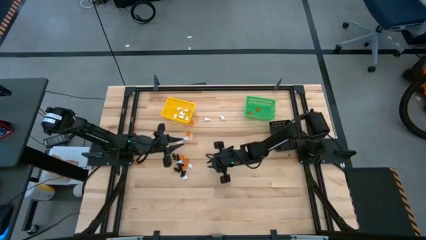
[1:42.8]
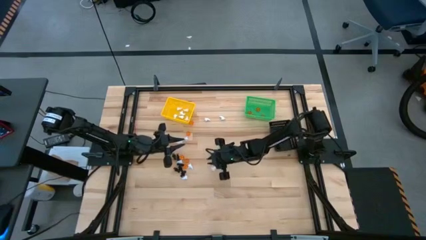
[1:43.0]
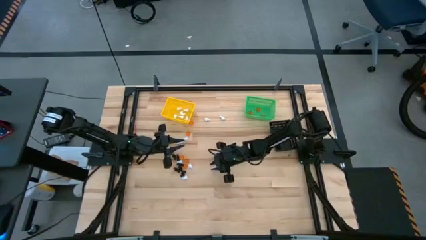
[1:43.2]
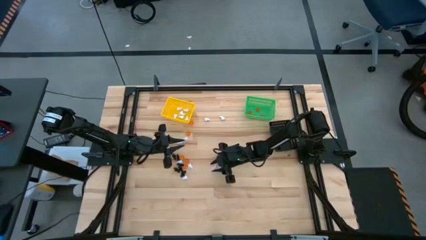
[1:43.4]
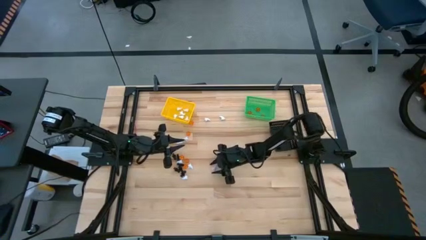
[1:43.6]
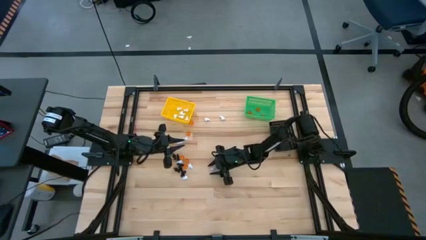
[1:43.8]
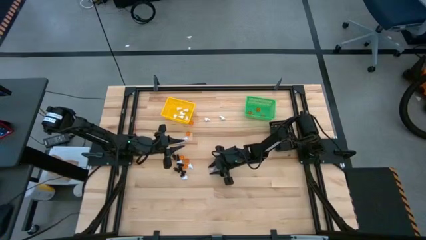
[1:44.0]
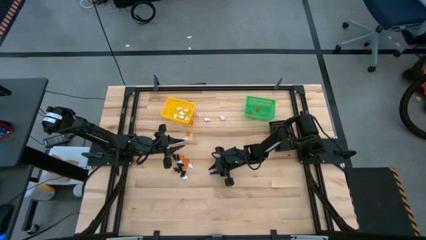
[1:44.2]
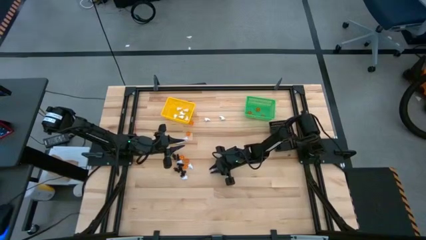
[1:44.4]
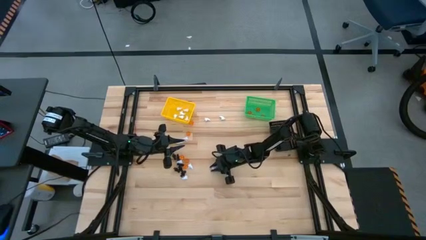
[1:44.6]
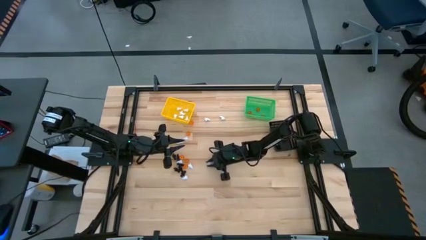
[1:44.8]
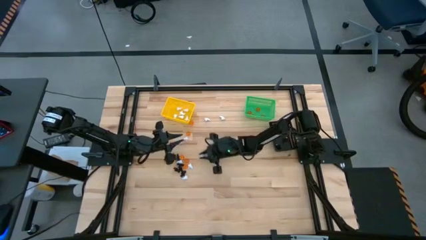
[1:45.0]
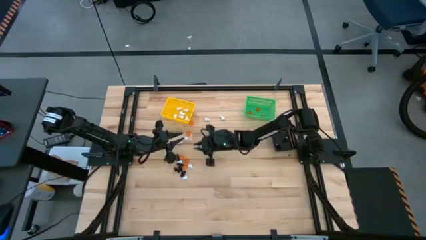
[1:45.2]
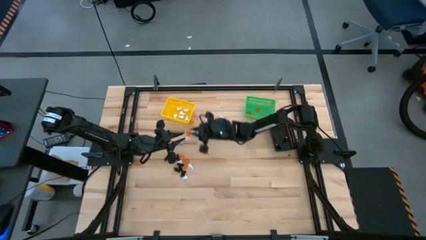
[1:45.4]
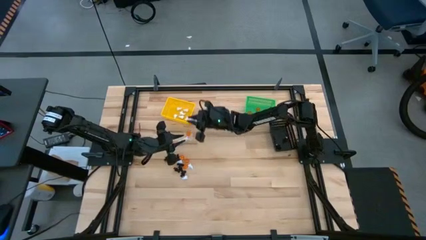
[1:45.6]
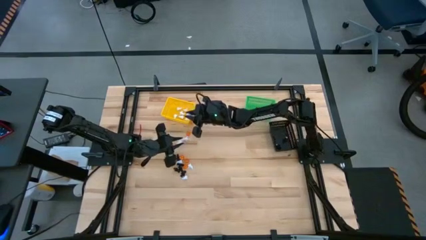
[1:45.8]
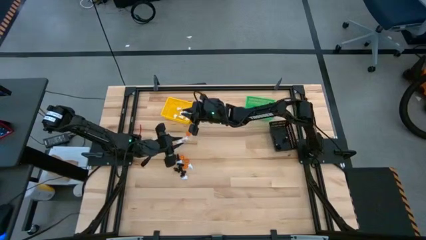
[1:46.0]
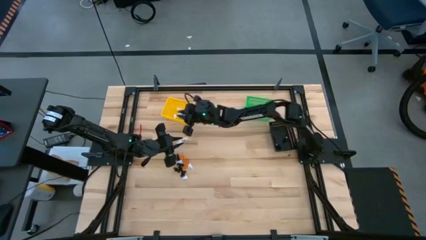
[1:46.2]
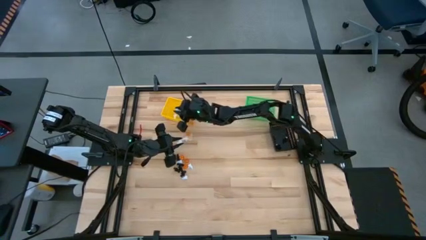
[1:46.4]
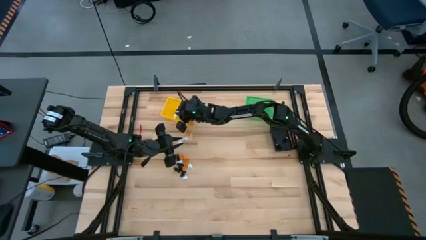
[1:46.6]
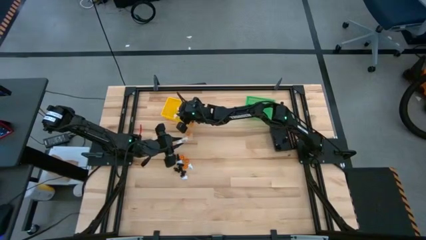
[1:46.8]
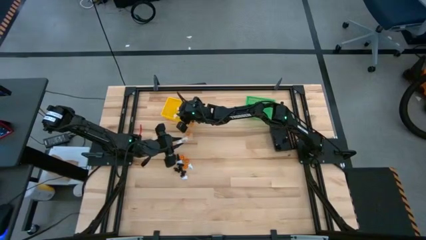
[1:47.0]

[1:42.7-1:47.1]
Task: Sort Halloween decoration
Put the white ghost toy into the yellow bin

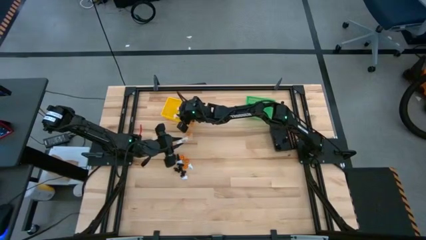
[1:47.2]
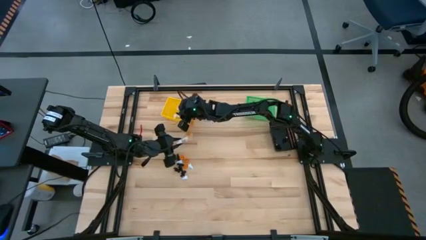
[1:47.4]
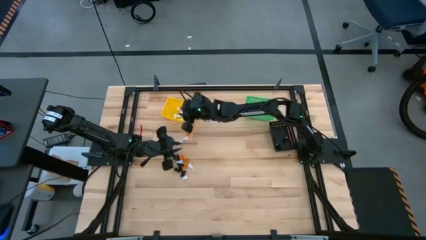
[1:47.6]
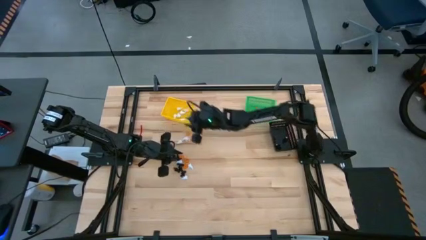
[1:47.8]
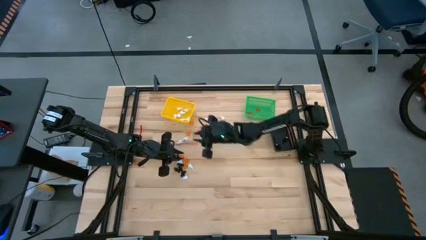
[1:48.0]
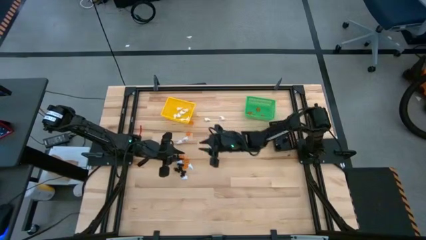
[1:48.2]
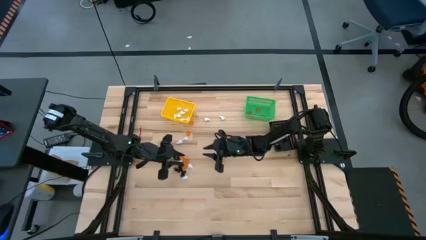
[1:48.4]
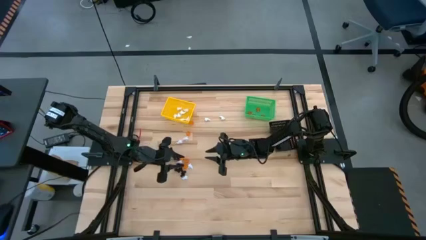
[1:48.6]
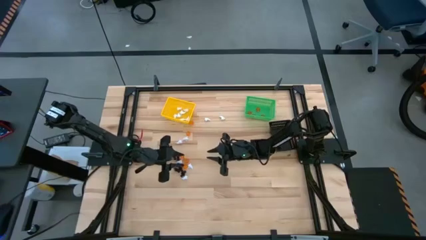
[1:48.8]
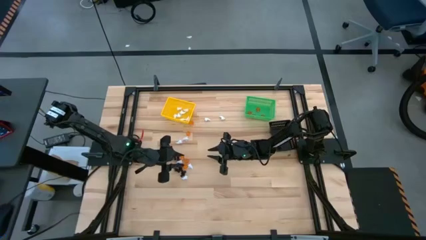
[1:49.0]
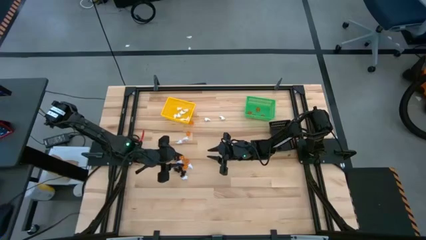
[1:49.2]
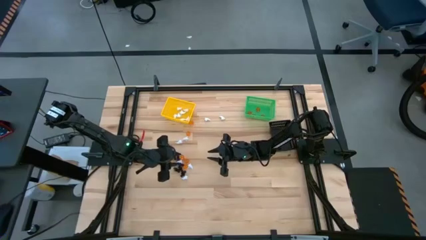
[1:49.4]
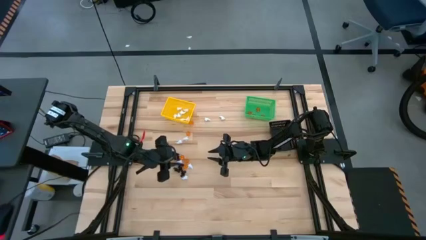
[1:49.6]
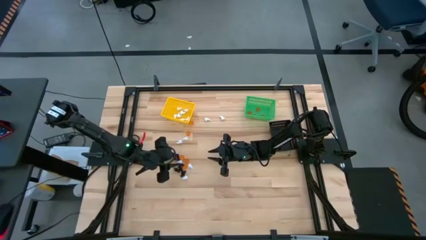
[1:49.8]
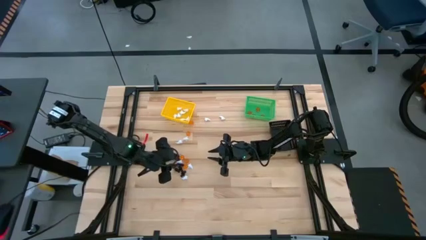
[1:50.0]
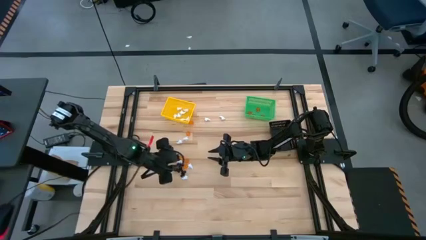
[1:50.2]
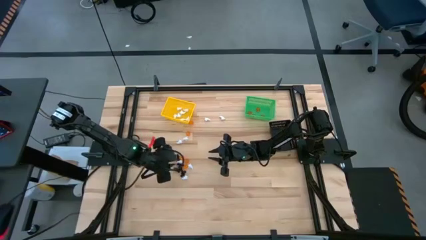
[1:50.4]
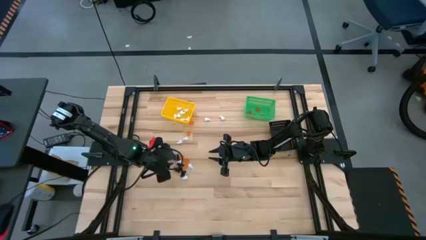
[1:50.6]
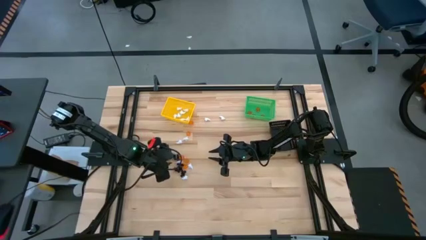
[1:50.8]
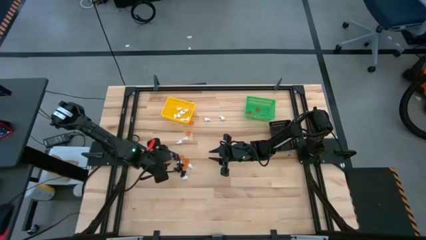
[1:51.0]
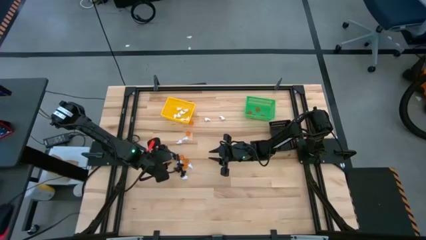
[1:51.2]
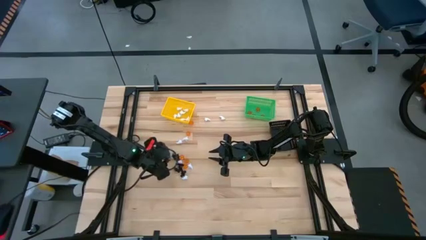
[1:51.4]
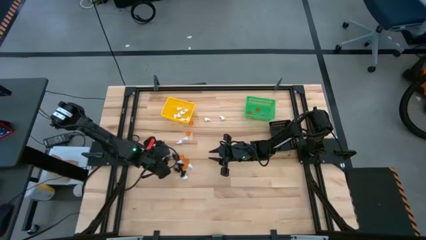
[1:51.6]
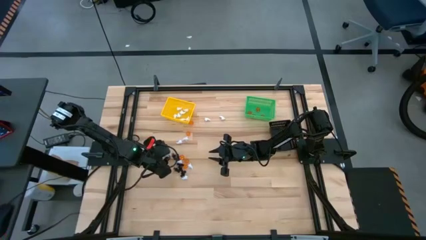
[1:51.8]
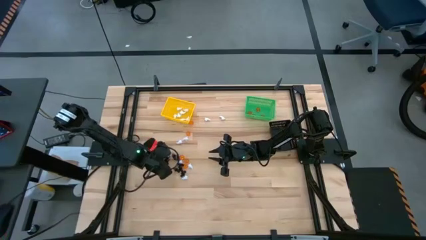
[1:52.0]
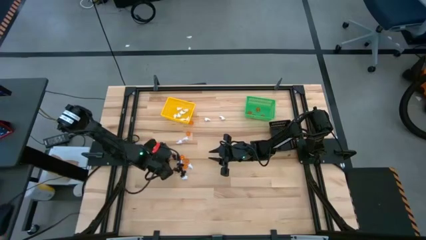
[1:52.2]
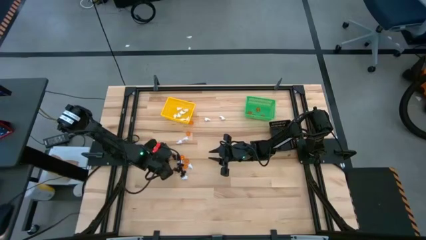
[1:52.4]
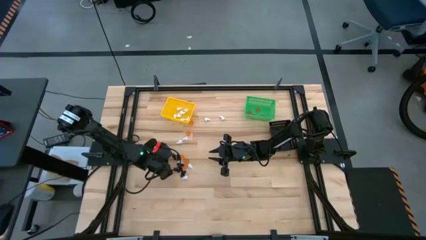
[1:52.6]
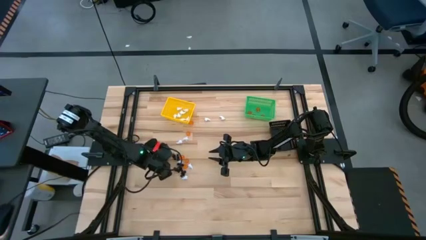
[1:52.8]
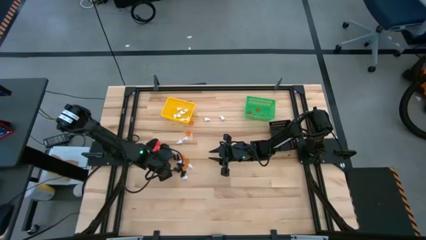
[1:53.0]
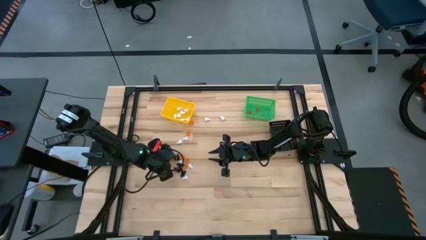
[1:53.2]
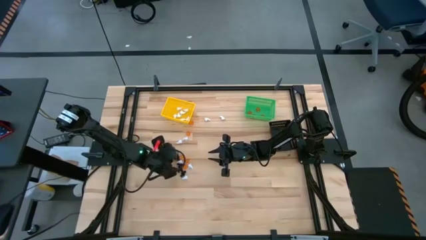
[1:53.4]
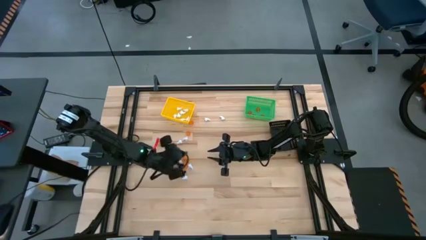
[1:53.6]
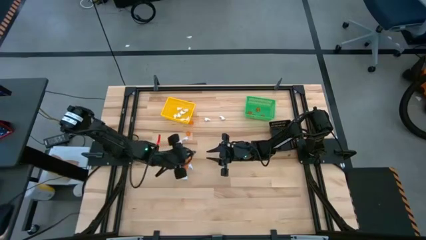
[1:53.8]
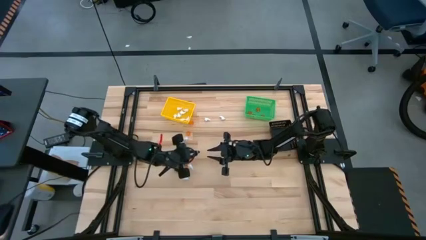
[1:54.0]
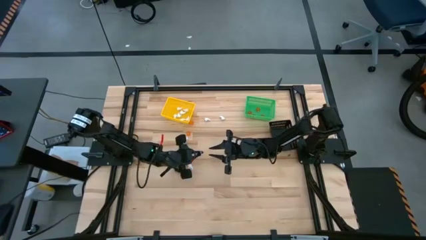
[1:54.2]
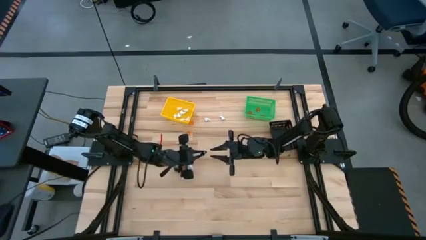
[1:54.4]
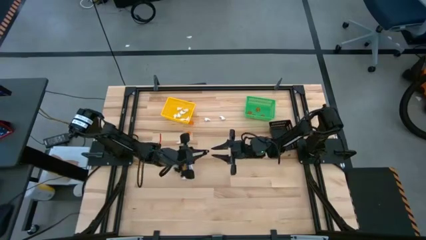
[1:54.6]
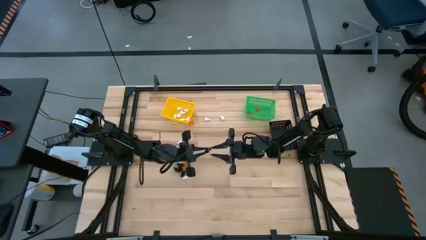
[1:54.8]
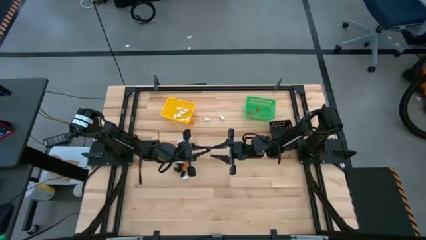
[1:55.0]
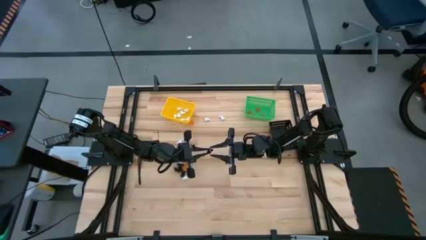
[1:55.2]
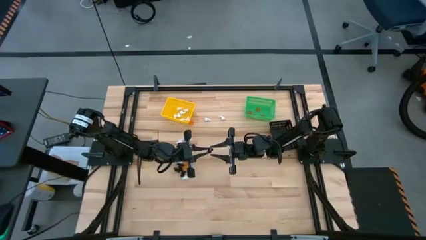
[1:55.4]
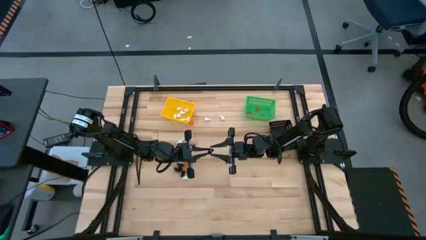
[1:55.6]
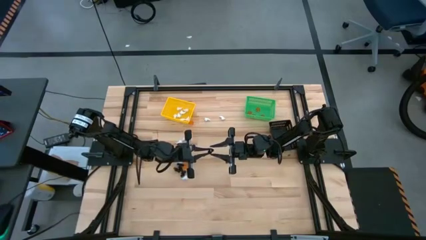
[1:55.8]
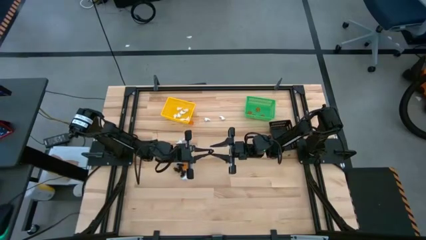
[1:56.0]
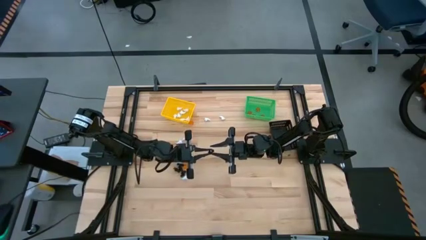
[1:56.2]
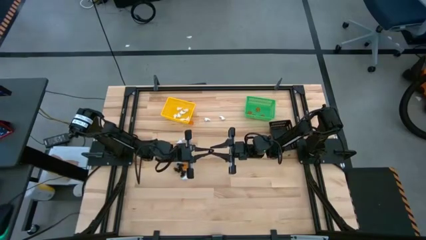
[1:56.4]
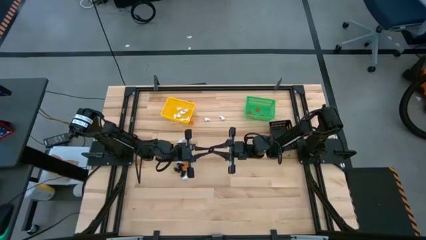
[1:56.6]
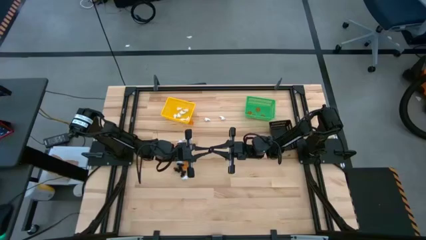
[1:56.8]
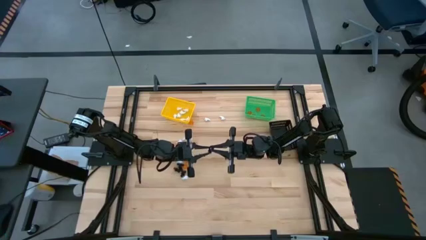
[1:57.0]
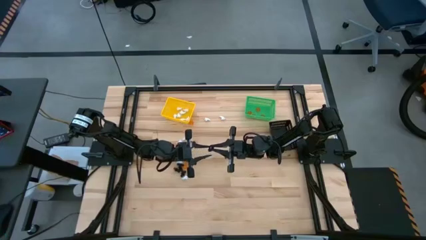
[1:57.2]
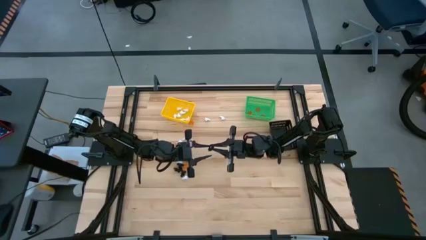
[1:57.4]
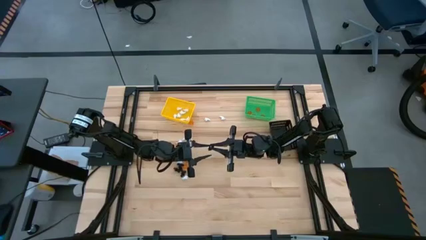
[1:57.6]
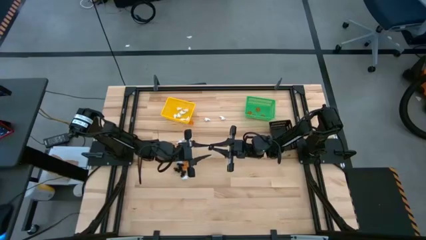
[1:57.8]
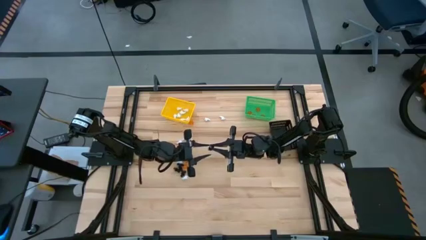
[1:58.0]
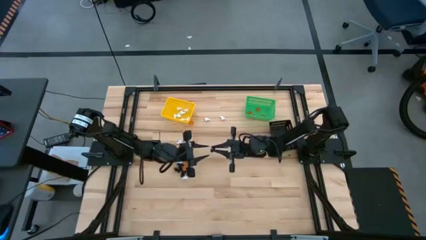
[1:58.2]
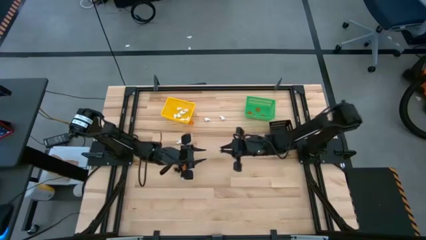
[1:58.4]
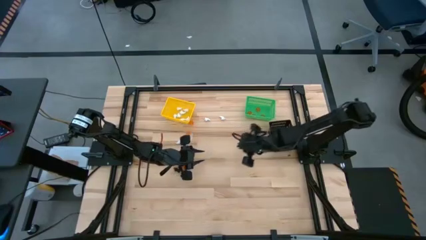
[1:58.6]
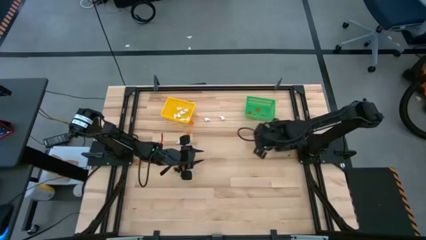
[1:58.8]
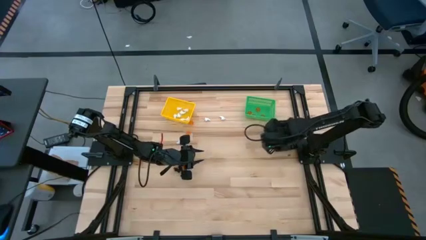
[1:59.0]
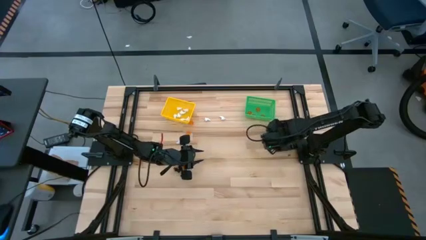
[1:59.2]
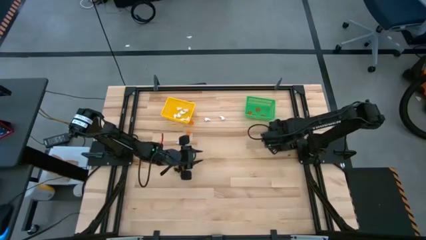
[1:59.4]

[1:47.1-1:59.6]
Put the black skeleton toy into the black bin
